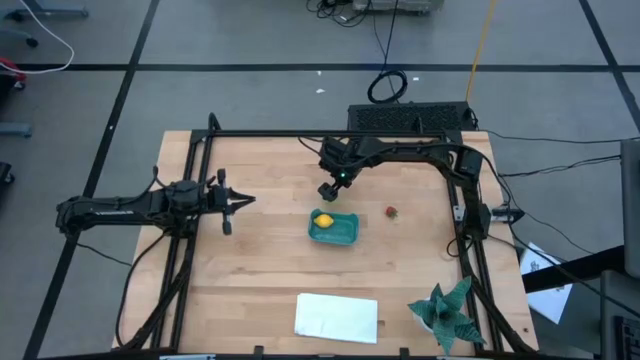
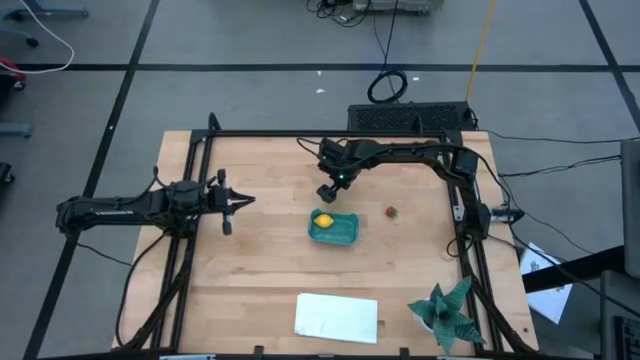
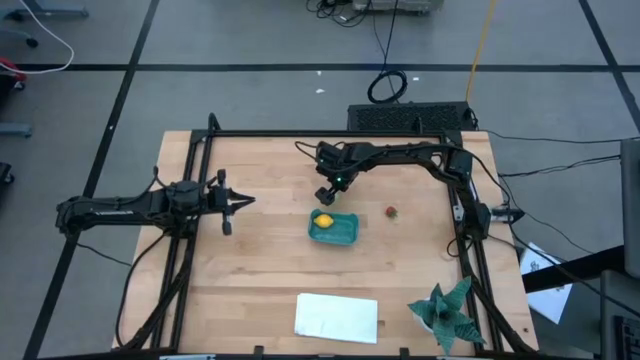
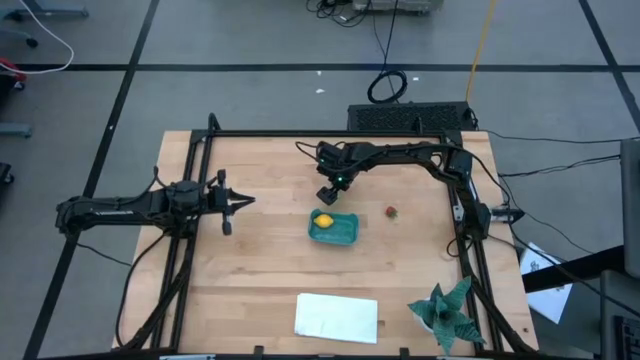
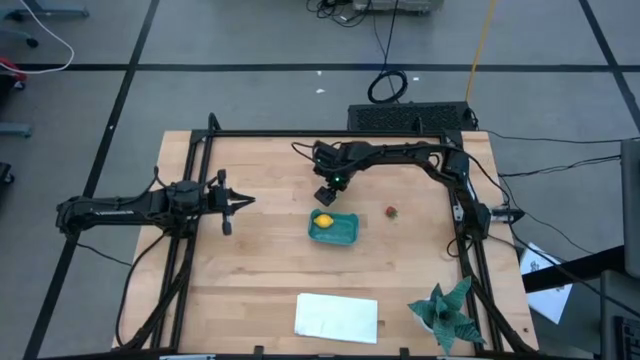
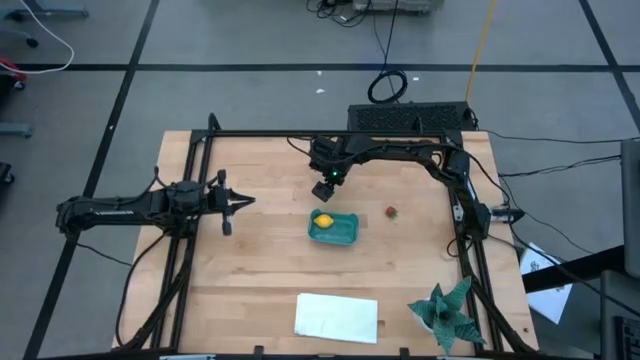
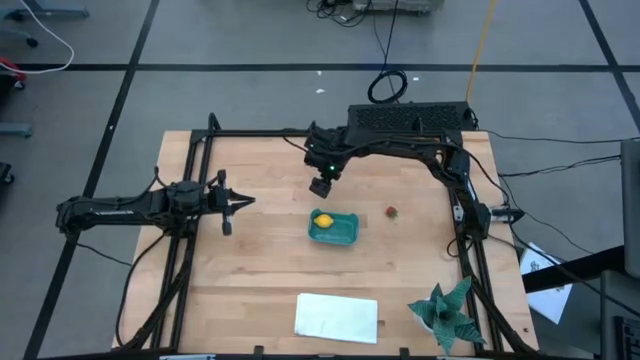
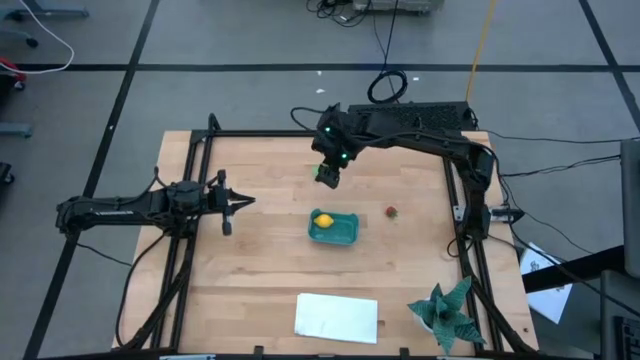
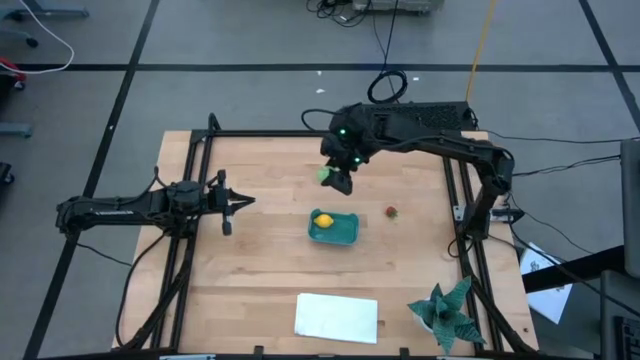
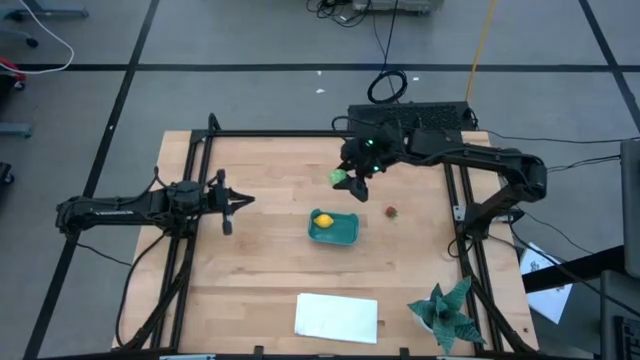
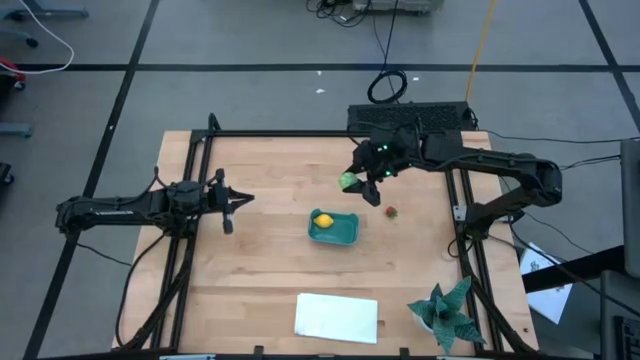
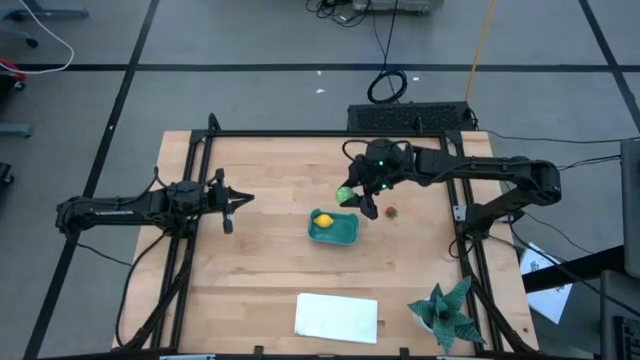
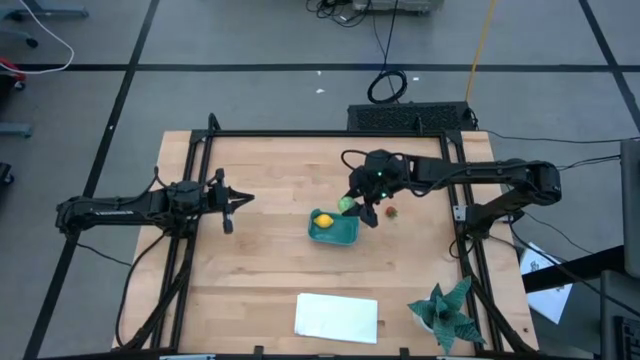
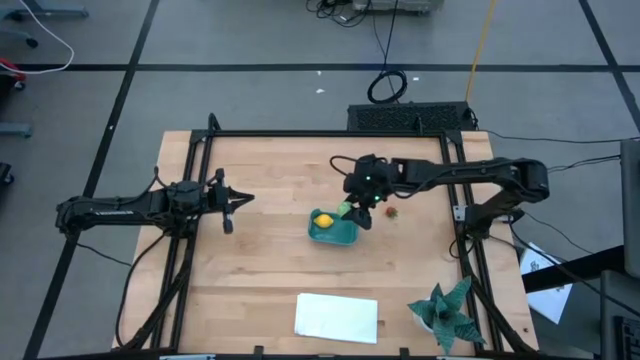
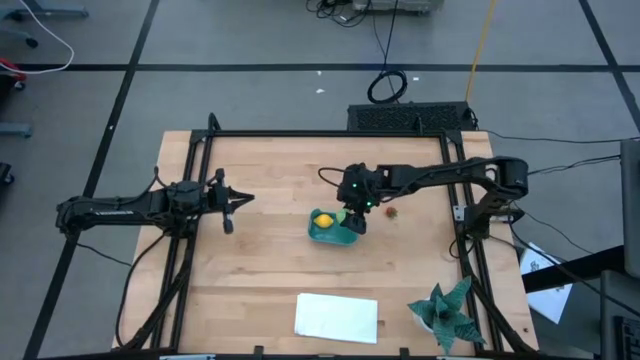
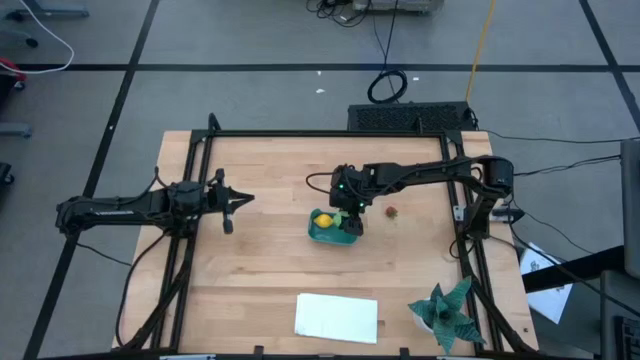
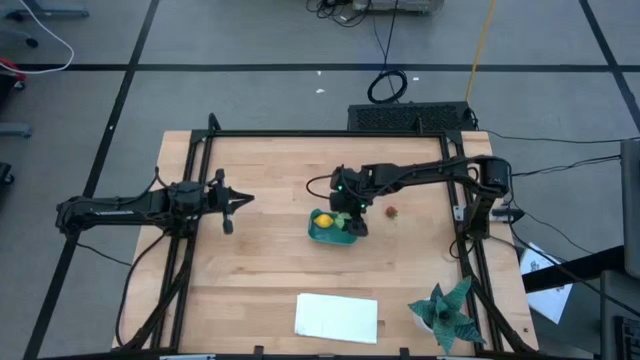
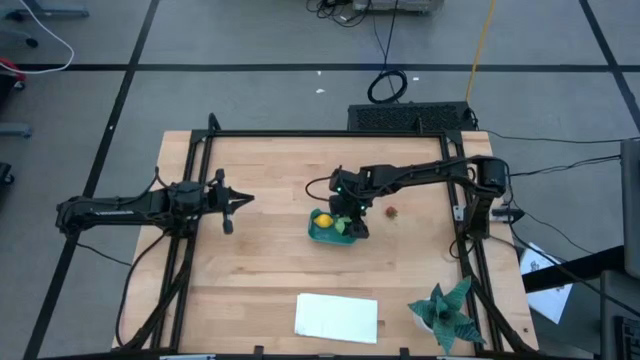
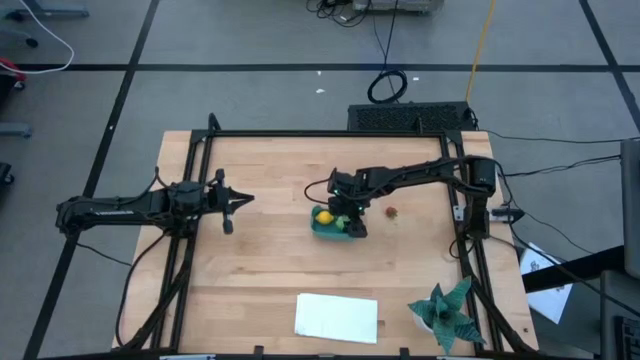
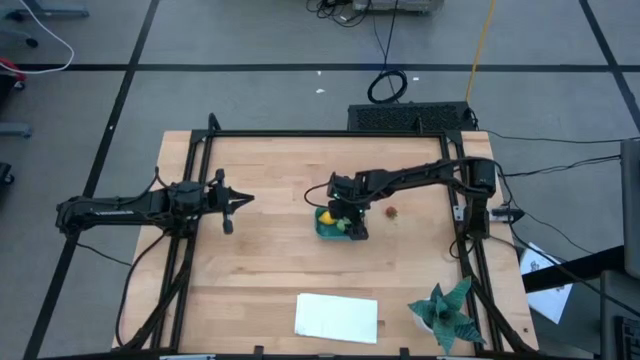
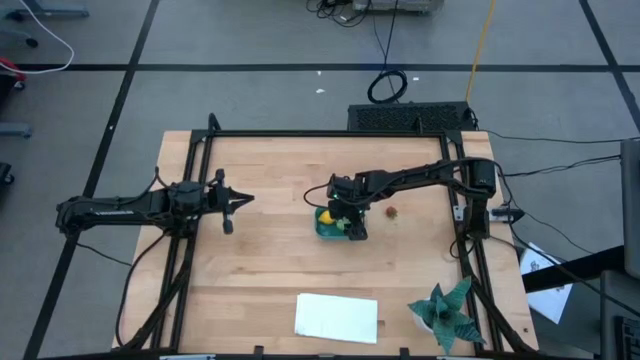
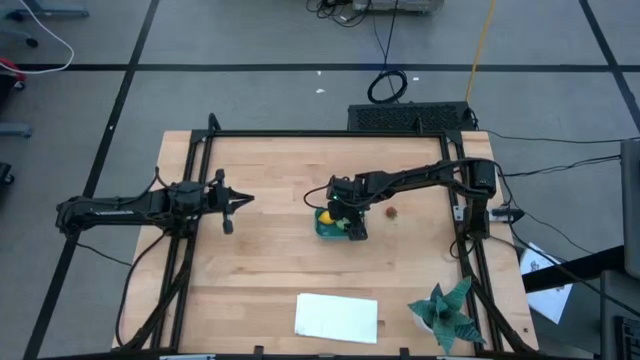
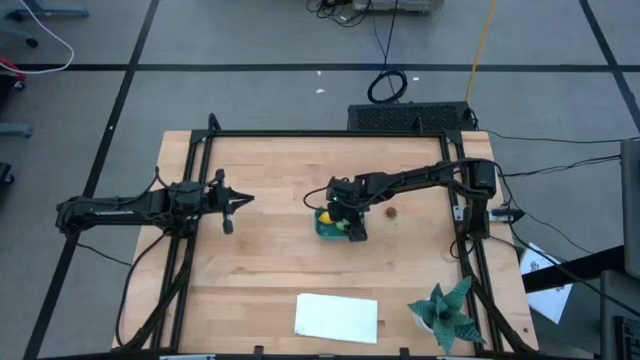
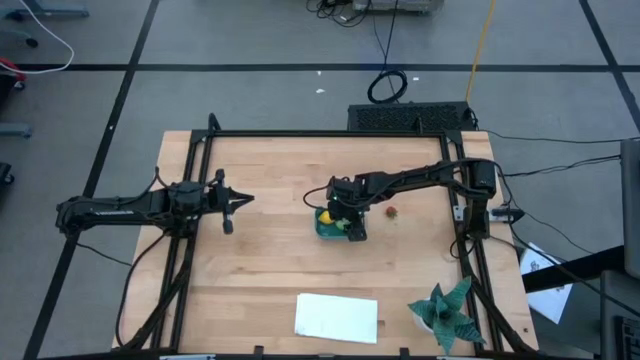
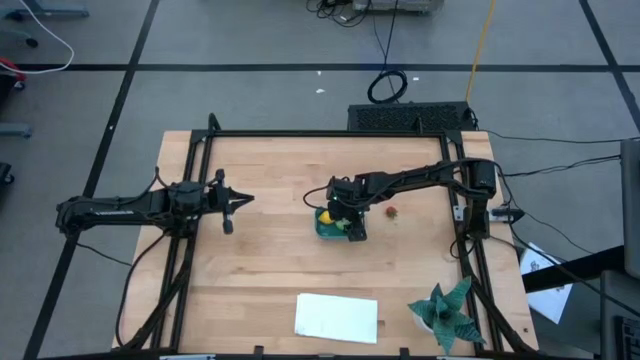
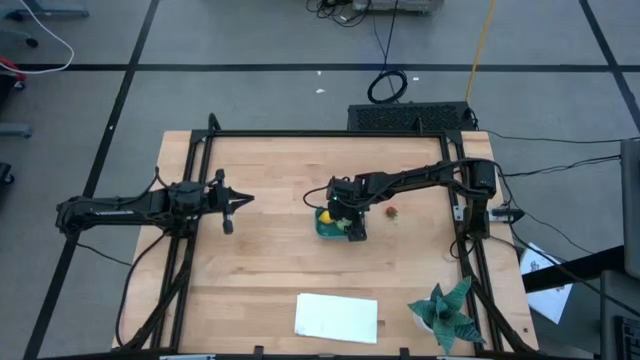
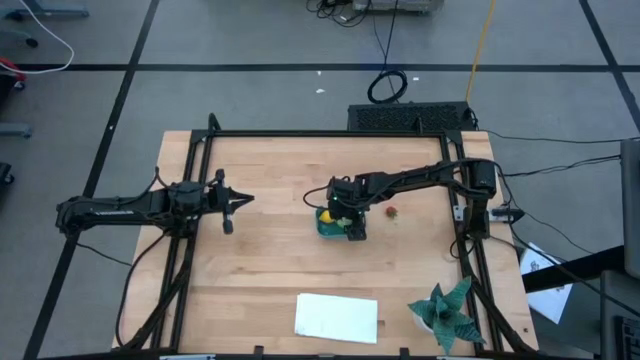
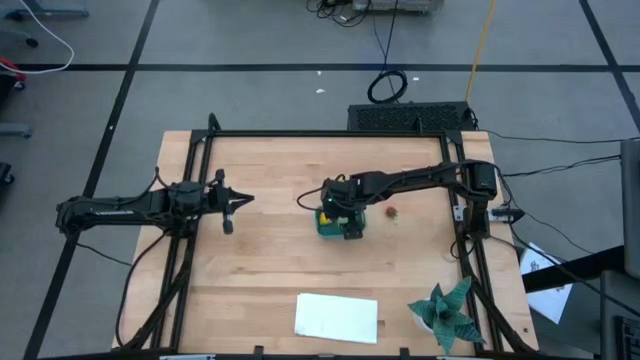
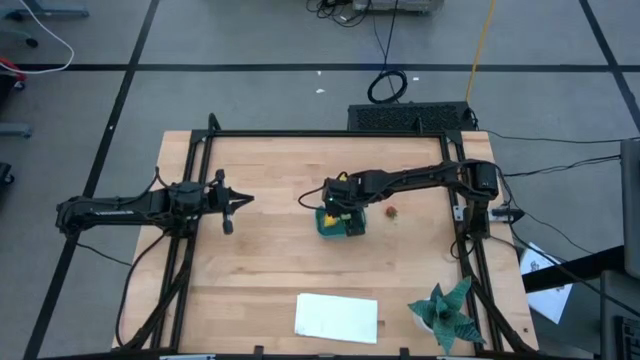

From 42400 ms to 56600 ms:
Task: Pick and placing Produce into tupperware
Put the green cabbage into the blue bin

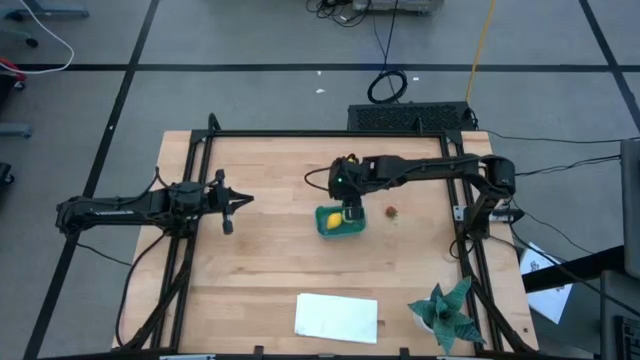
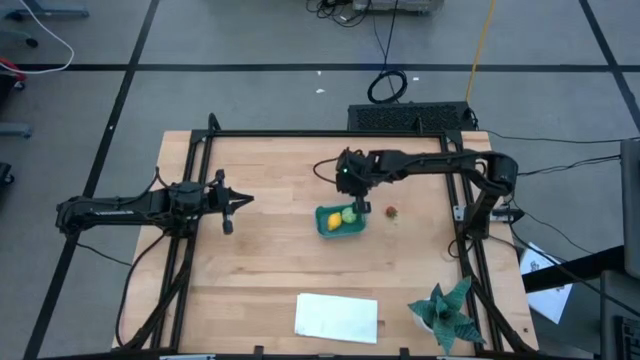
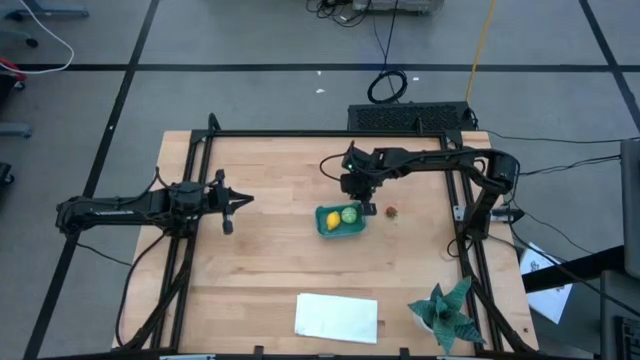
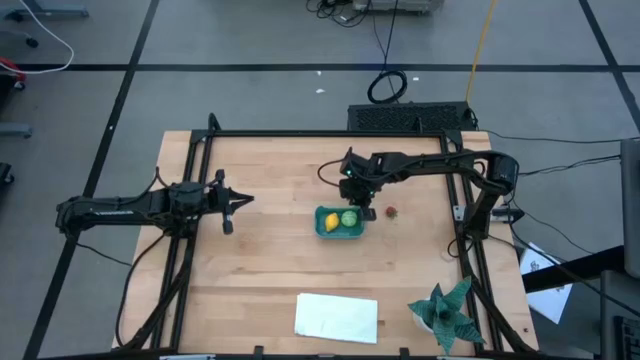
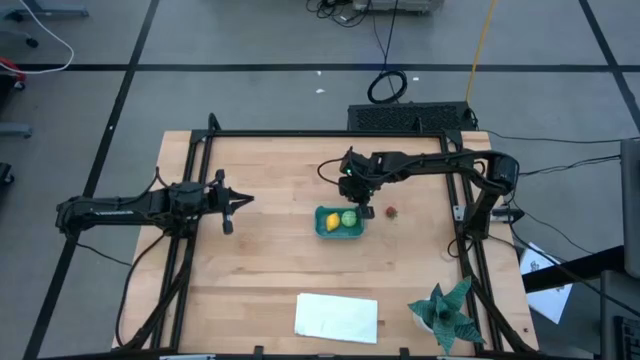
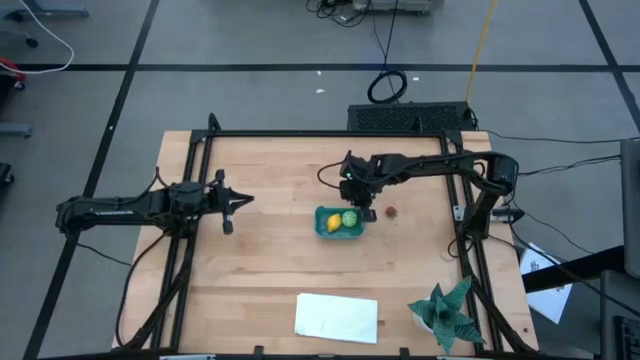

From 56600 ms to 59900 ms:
Adjust the blue bin

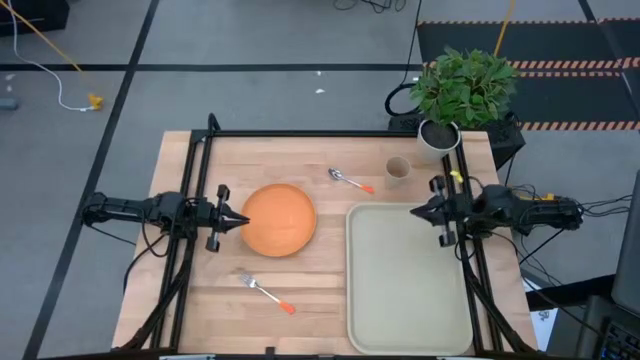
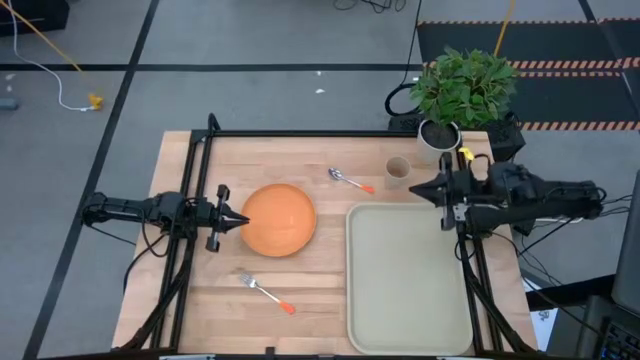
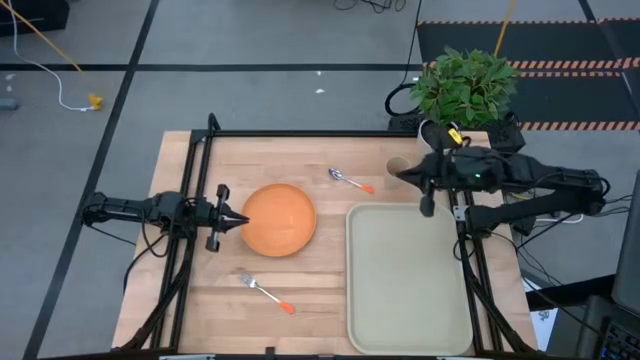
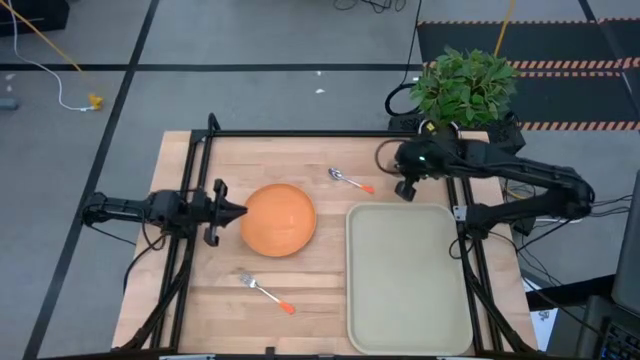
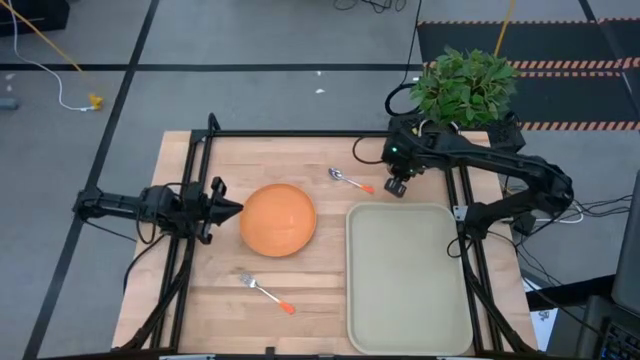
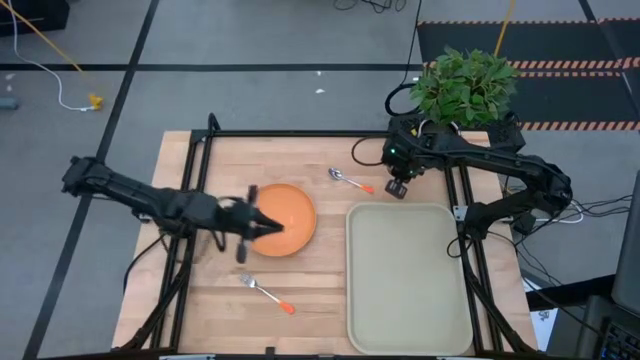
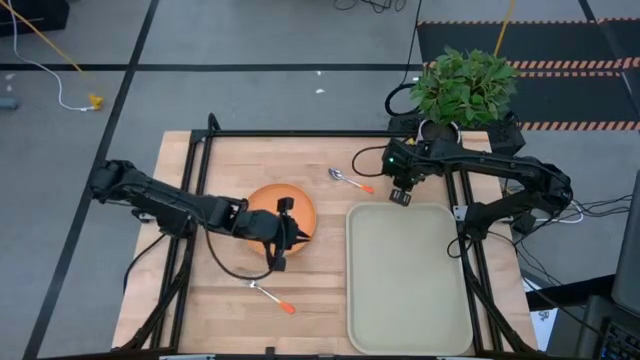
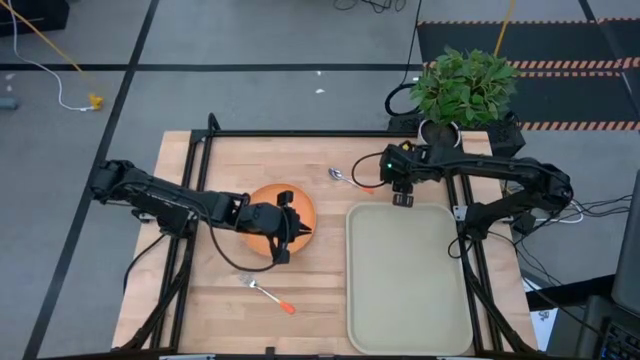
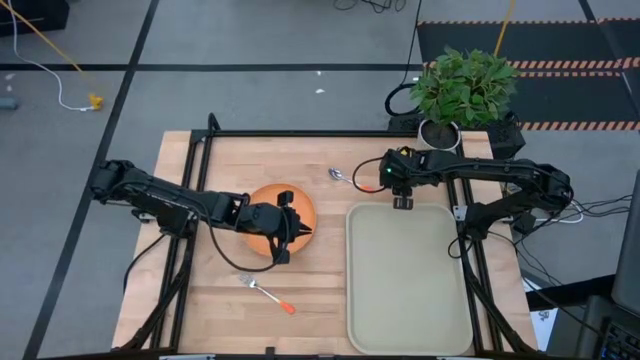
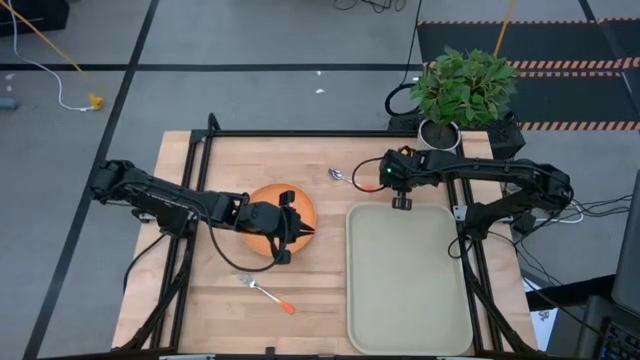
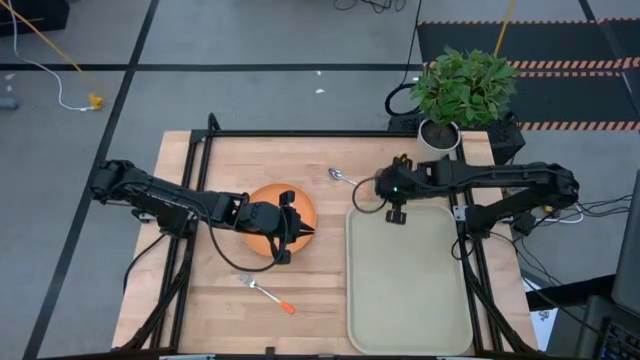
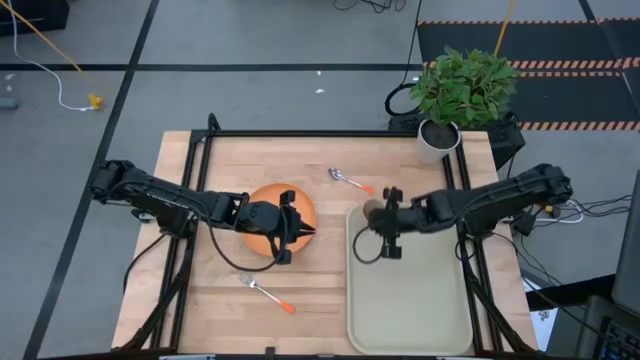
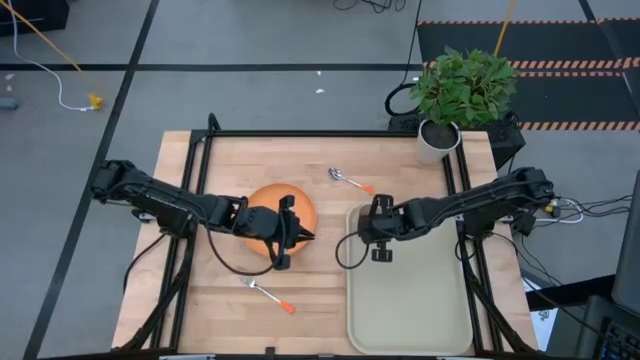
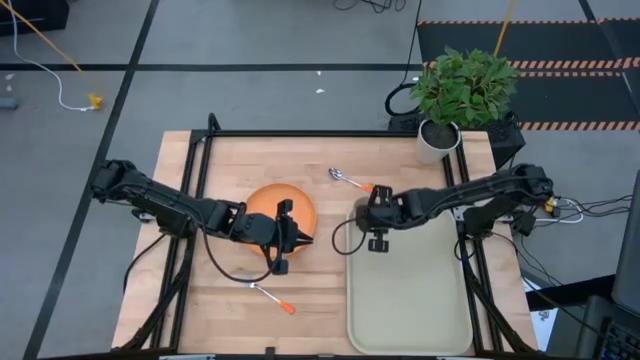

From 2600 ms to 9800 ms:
Task: Pick and place plate/cup/fork/spoon on tray
Put the light brown cup on the top right of the gray tray
